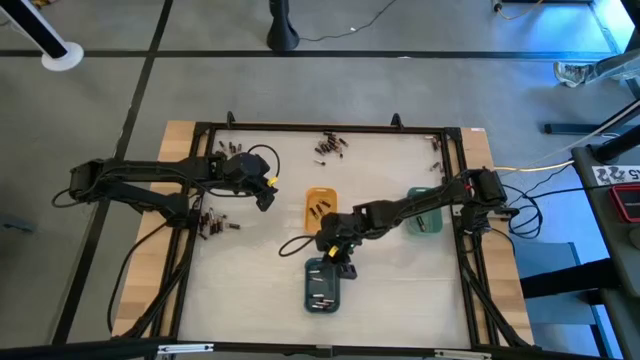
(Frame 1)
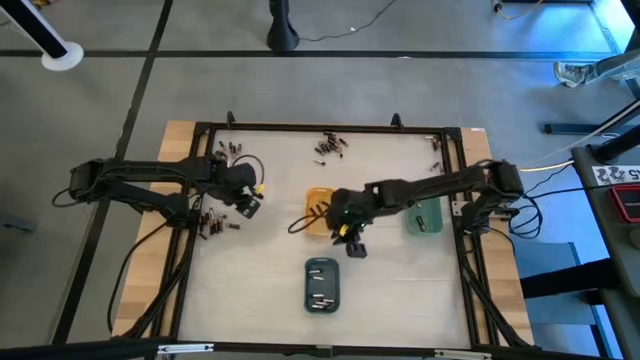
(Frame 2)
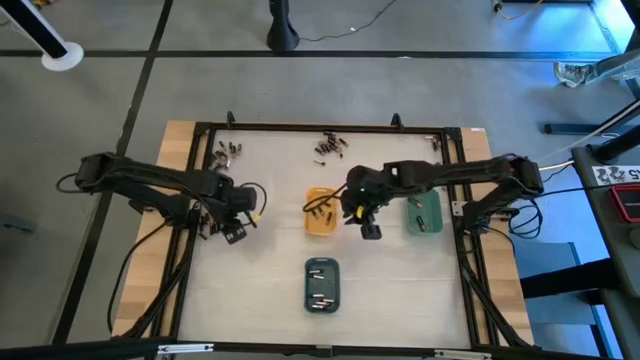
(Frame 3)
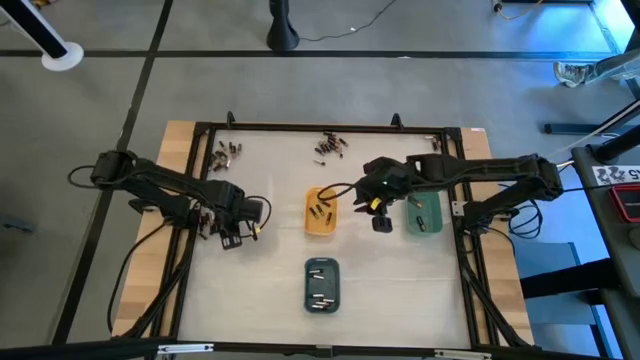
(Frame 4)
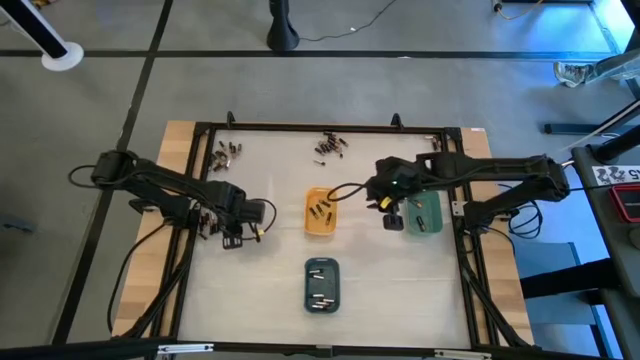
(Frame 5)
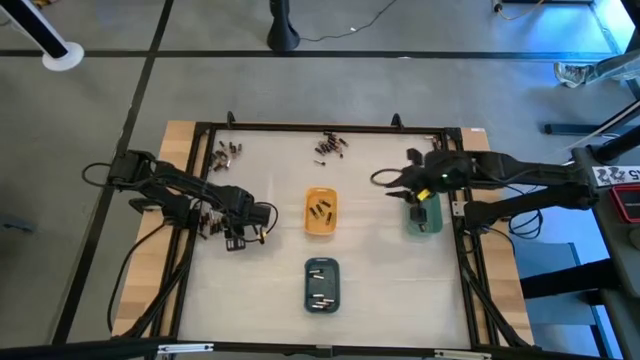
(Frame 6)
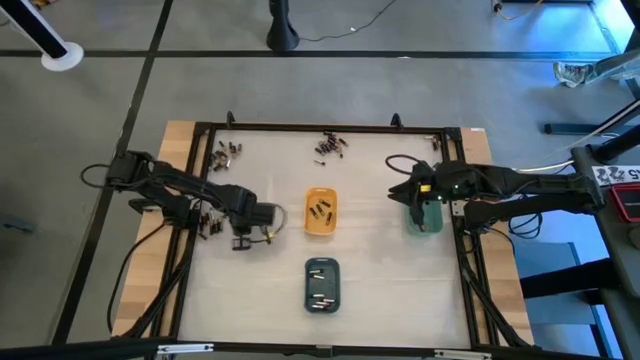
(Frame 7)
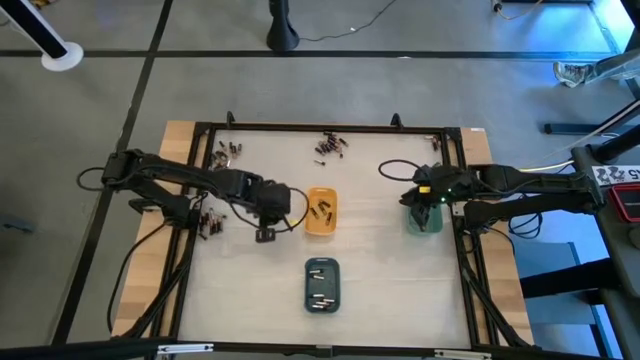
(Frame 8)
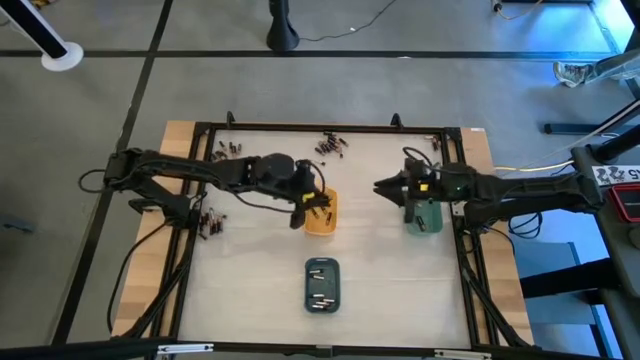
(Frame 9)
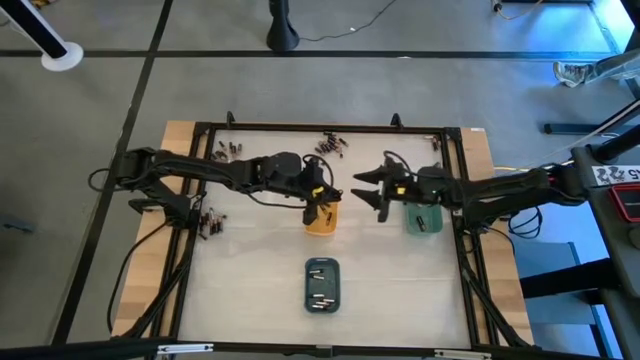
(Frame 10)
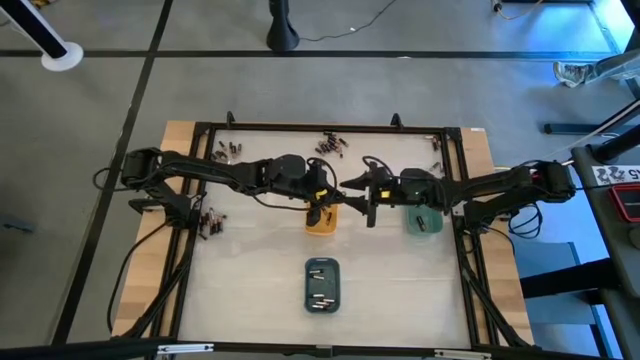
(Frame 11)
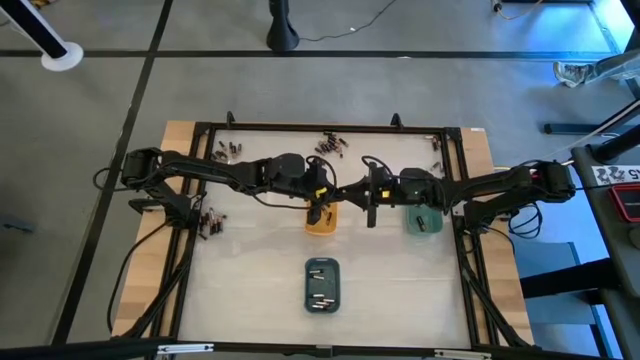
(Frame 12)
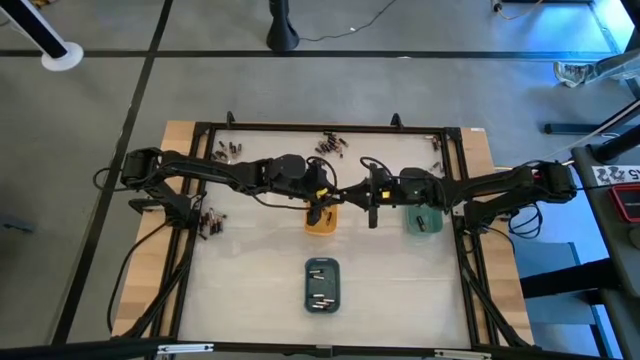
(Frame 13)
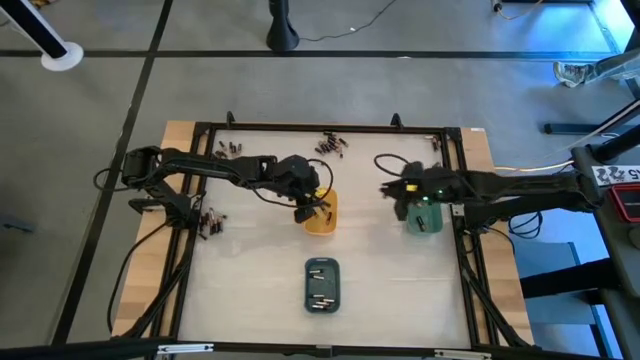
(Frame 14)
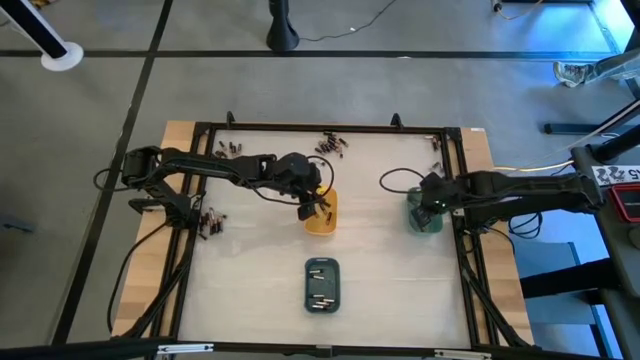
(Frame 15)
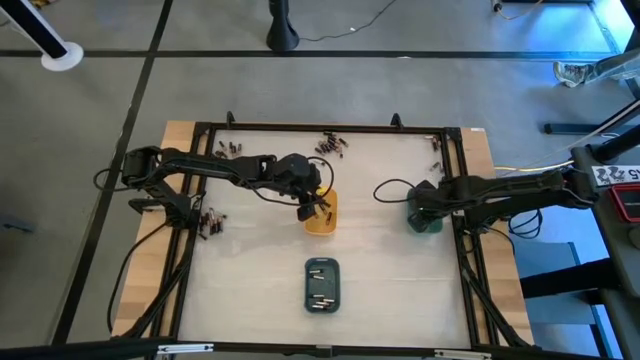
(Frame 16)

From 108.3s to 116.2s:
Task: Sort batteries
Put the black battery into the green bin

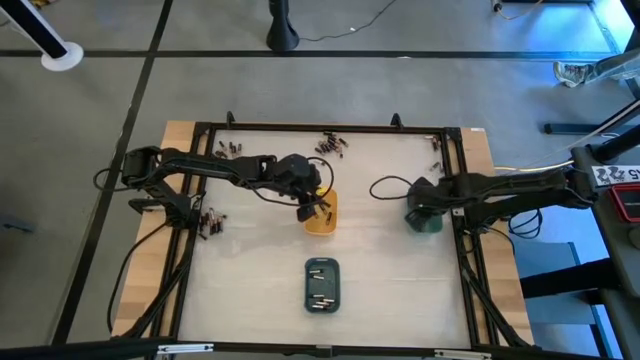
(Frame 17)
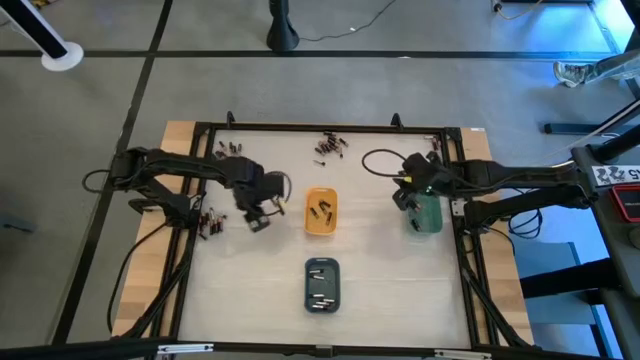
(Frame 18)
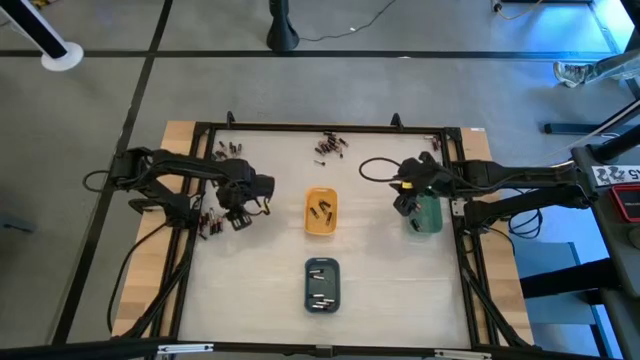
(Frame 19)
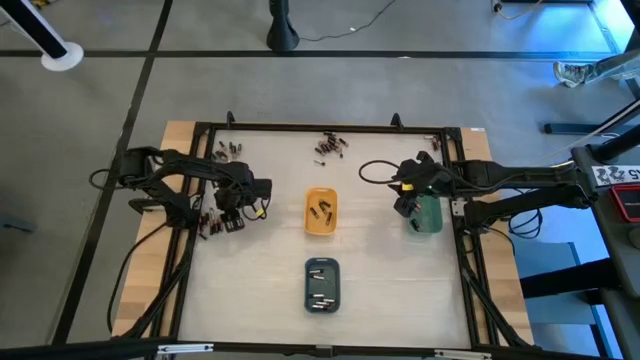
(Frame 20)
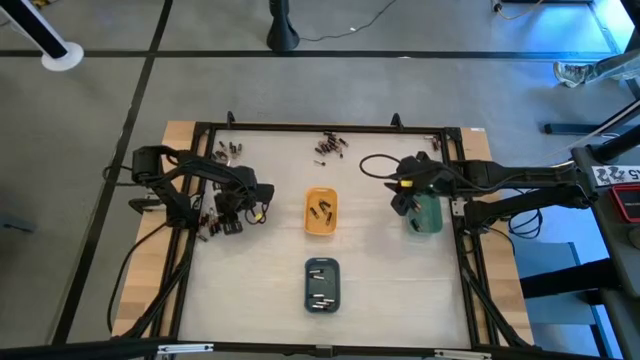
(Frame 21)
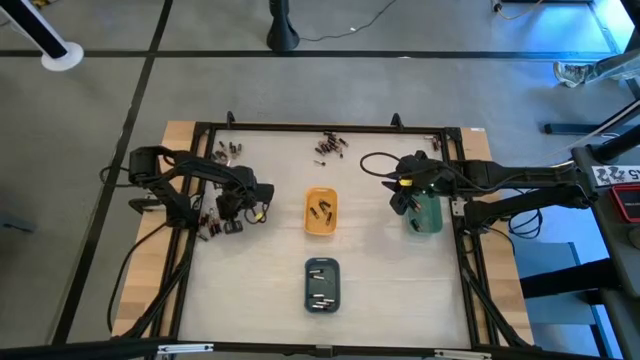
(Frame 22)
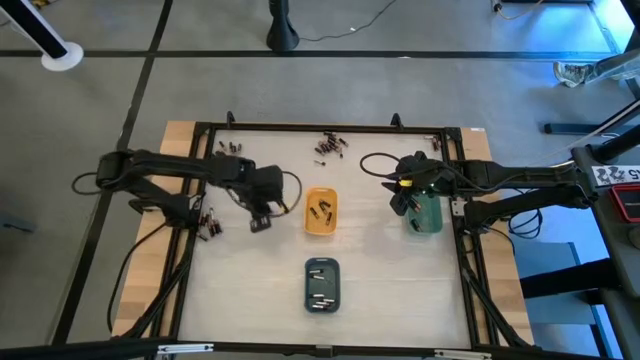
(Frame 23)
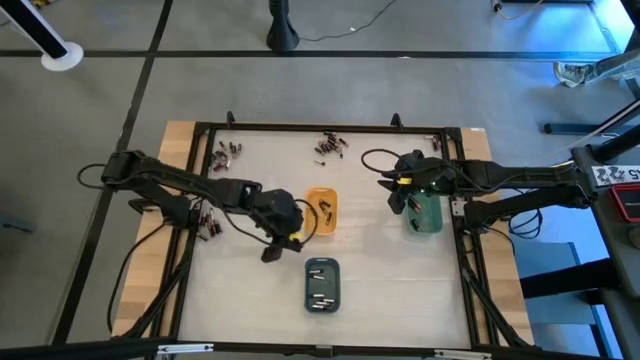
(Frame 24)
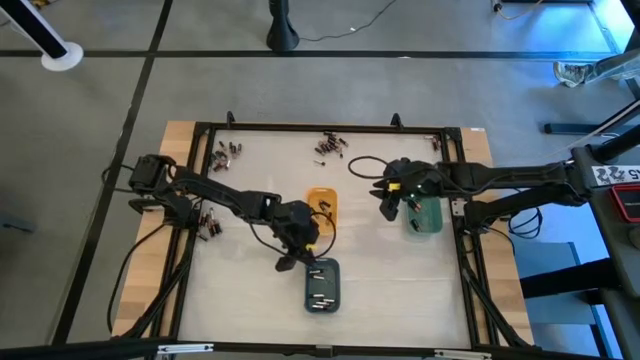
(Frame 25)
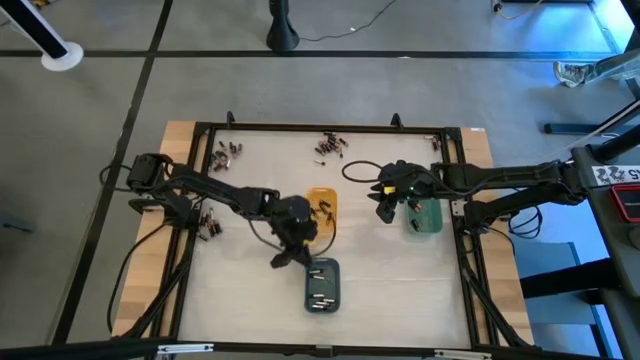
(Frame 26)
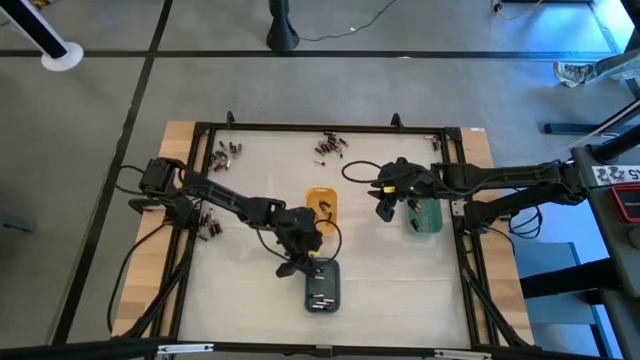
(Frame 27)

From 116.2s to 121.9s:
Put the silver battery into the blue bin

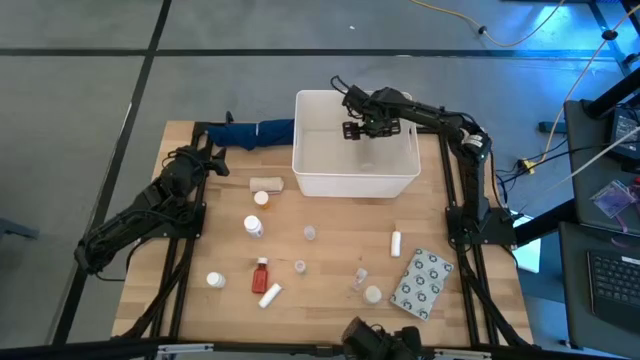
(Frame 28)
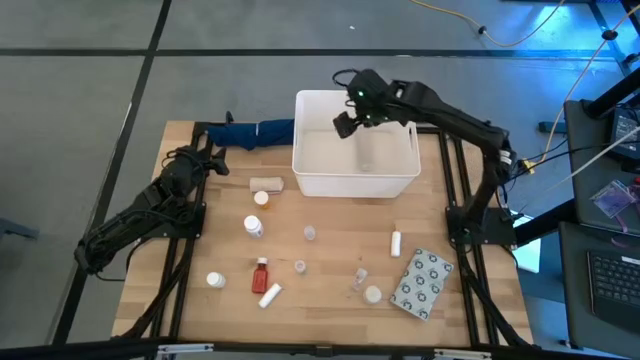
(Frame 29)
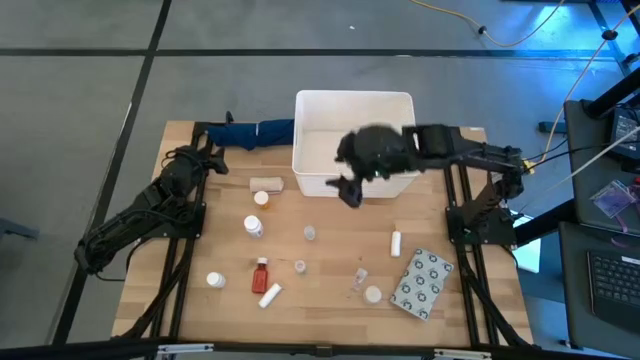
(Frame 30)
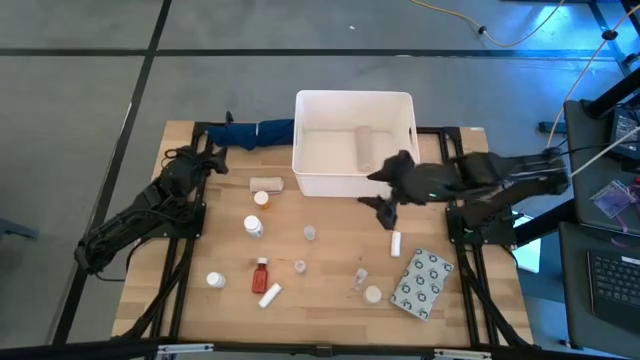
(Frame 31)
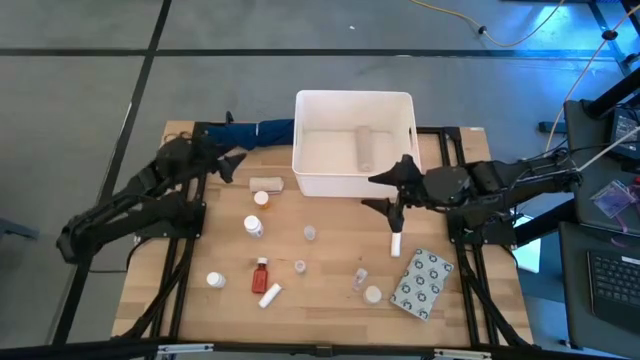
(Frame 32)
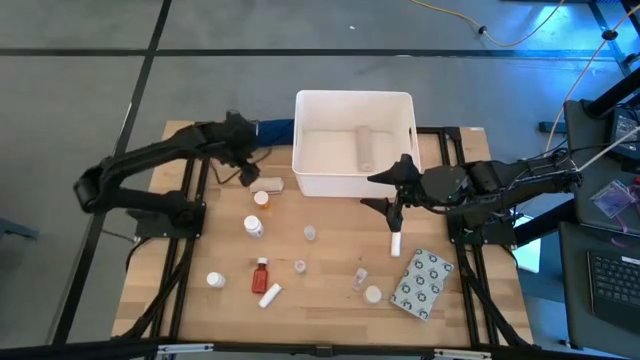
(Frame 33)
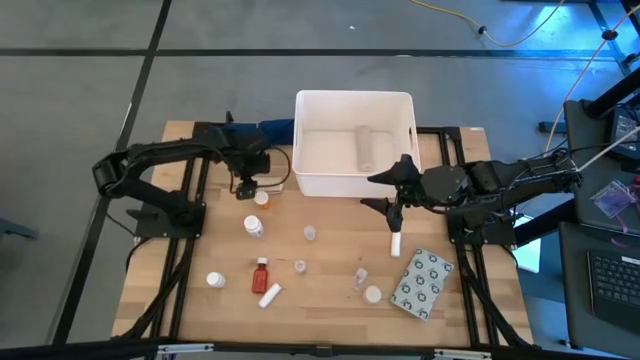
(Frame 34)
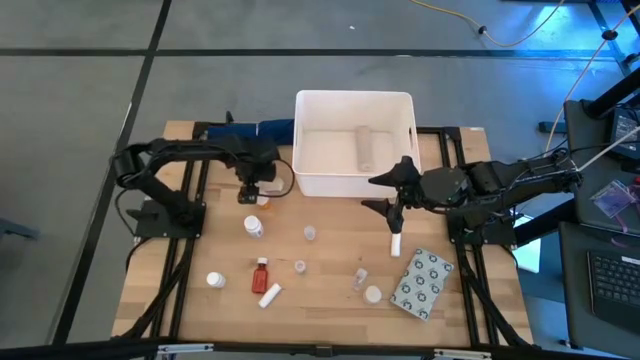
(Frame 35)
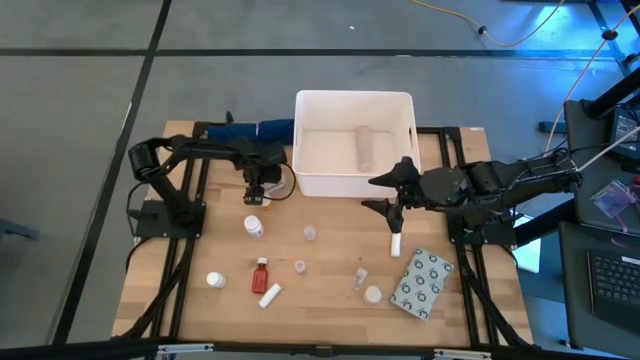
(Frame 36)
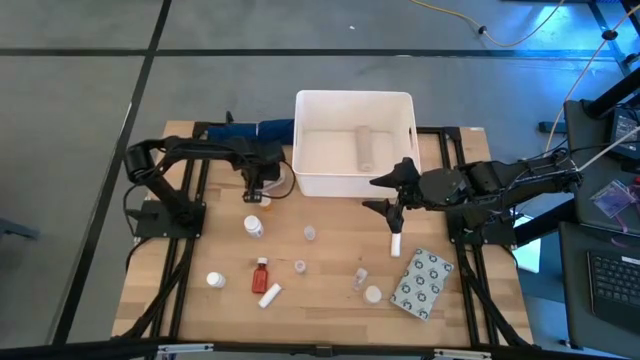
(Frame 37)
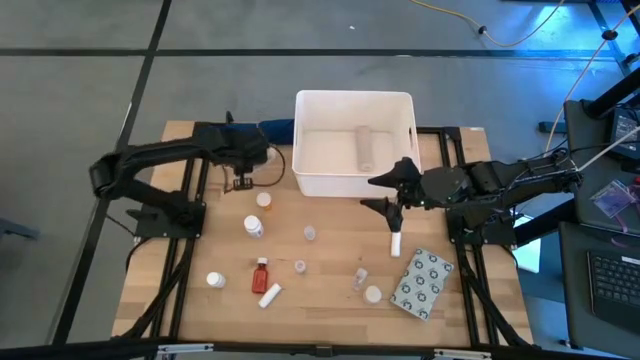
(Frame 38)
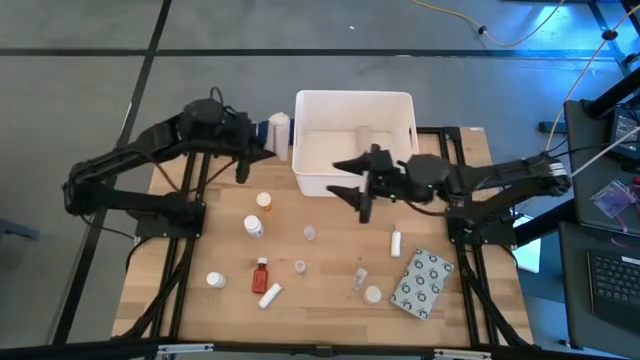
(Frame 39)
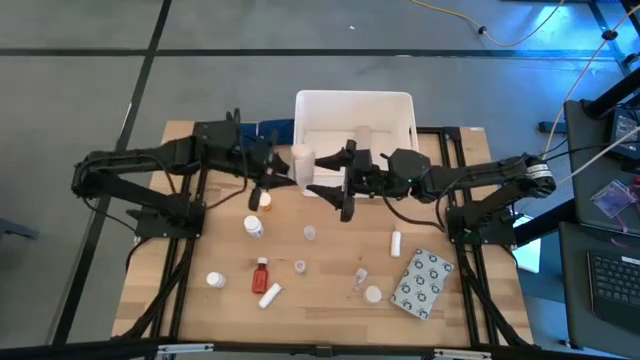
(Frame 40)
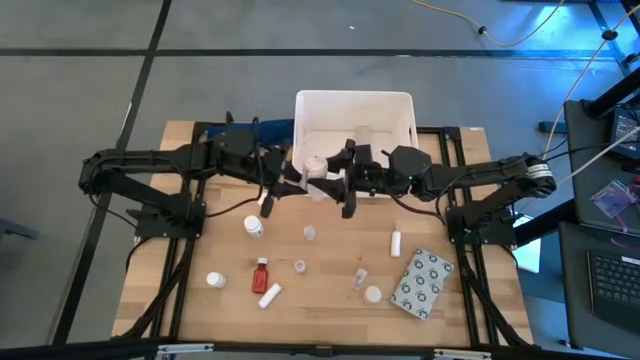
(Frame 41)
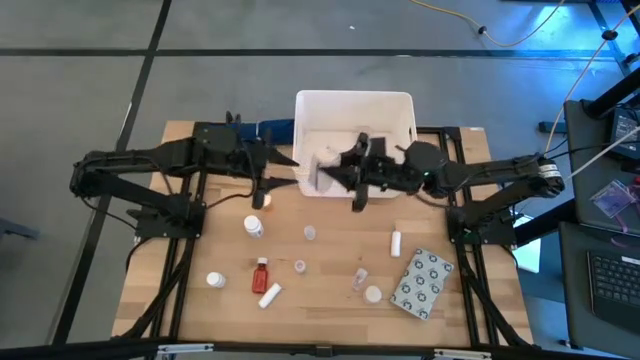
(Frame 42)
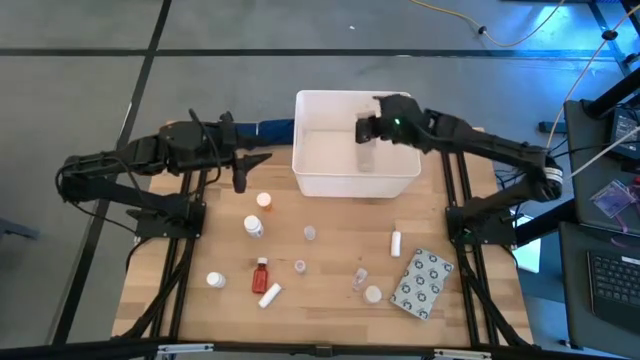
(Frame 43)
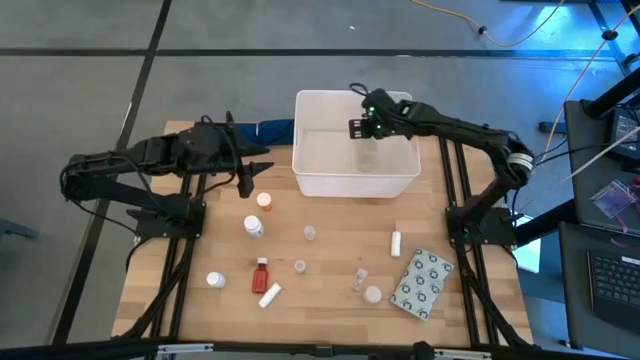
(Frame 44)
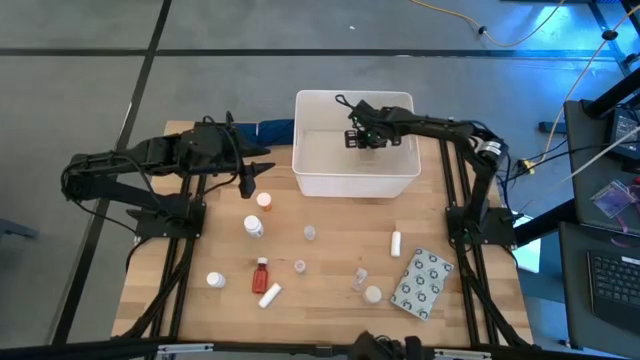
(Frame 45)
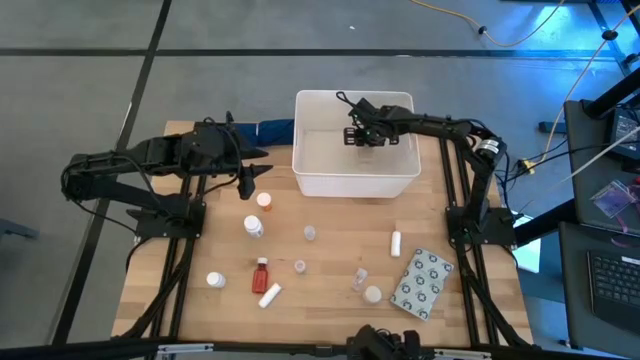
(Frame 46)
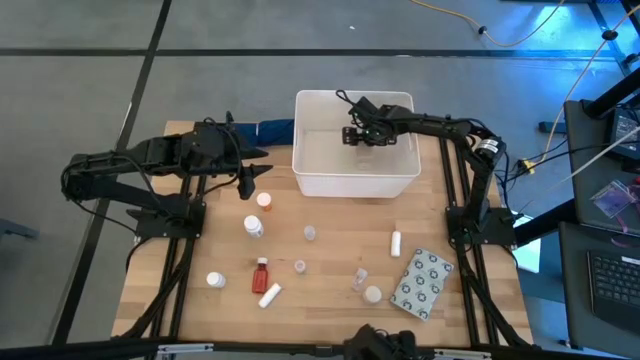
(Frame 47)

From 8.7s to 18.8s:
Task: Pick & place medical supplies in basket/bin
Put the brown bandage into the white bin
